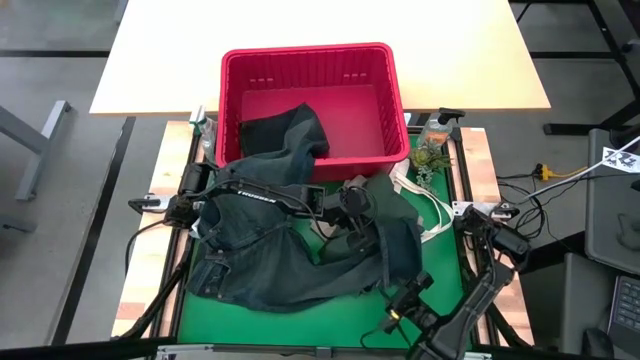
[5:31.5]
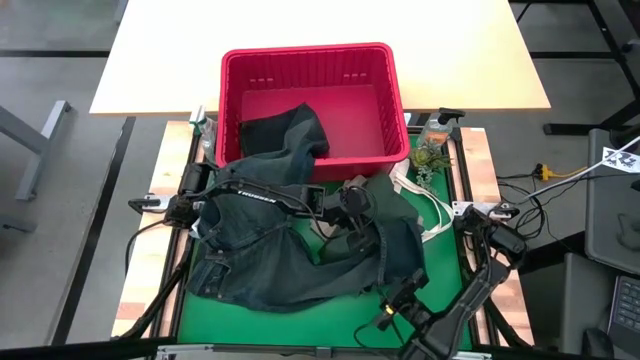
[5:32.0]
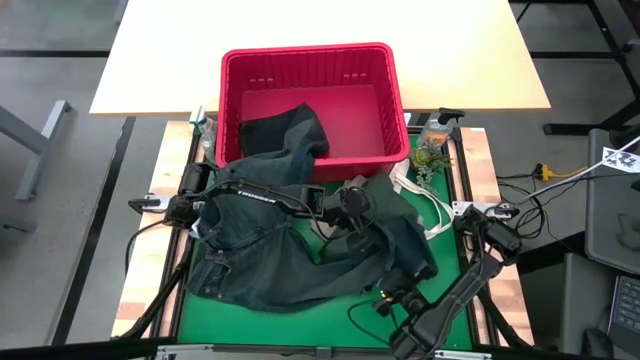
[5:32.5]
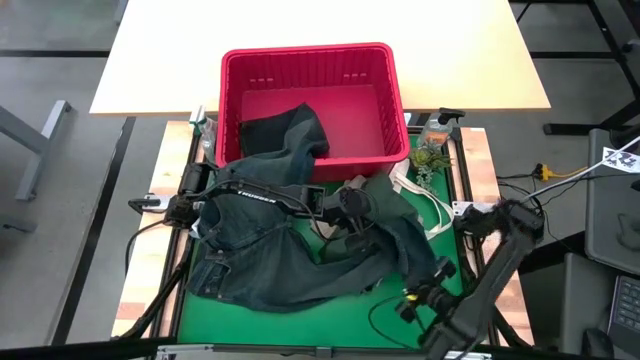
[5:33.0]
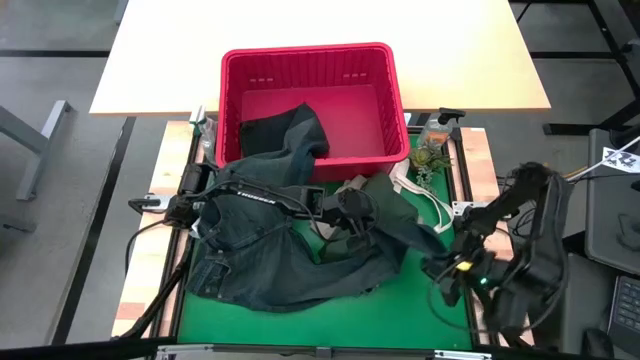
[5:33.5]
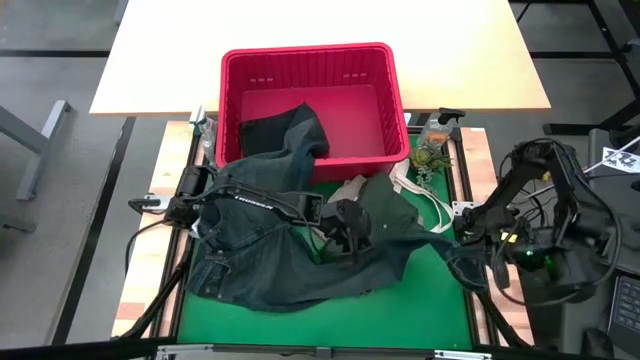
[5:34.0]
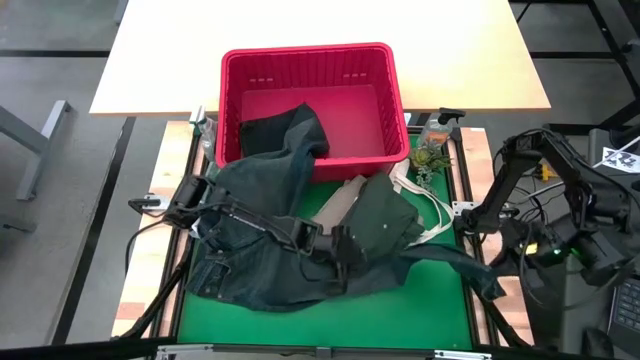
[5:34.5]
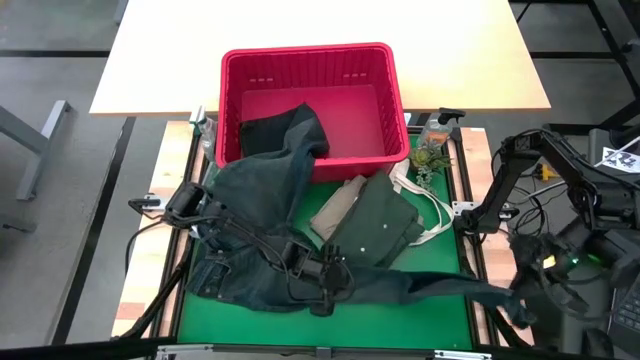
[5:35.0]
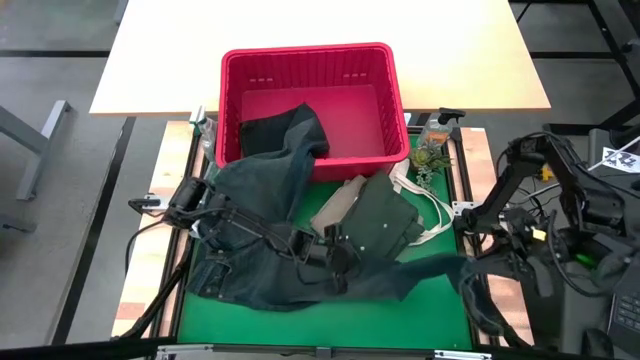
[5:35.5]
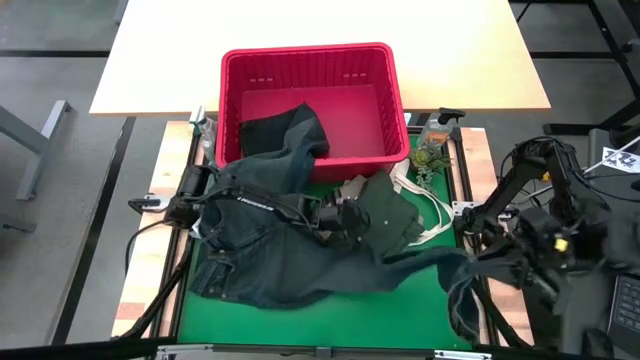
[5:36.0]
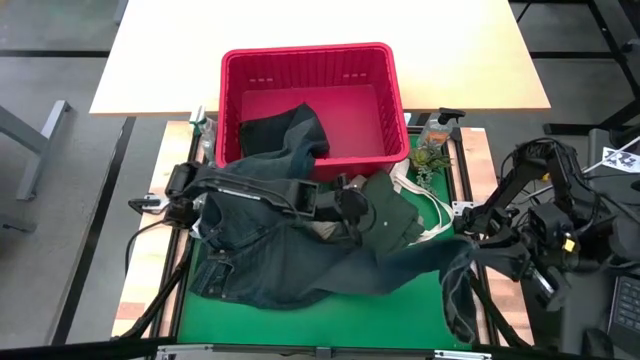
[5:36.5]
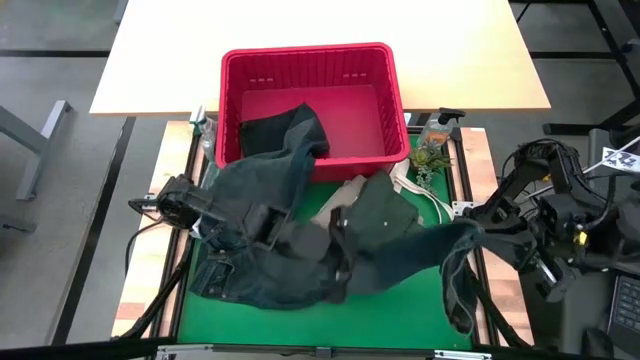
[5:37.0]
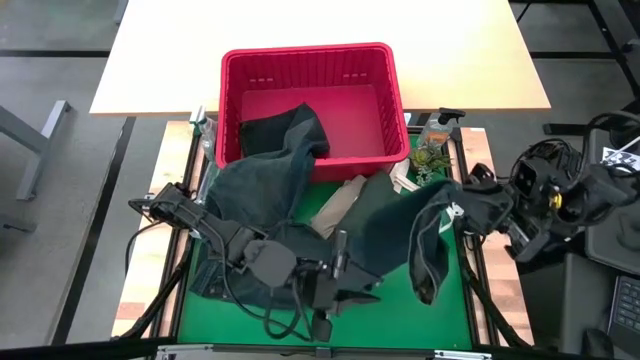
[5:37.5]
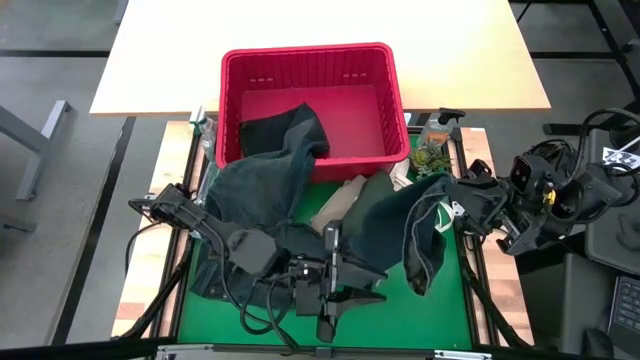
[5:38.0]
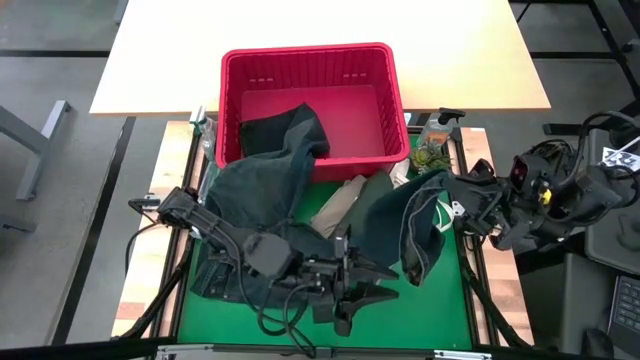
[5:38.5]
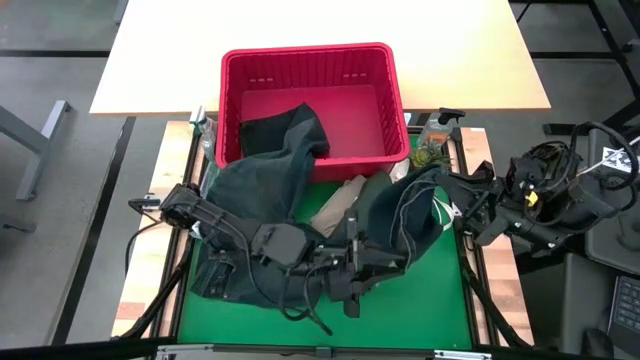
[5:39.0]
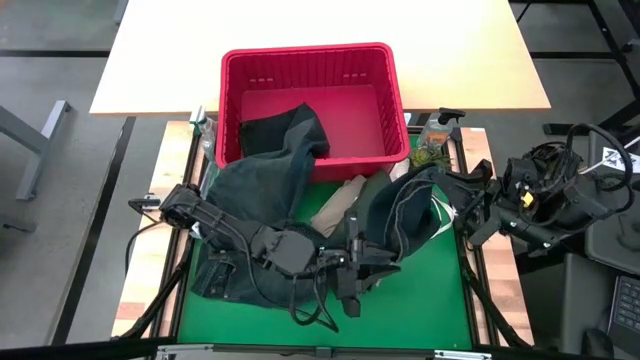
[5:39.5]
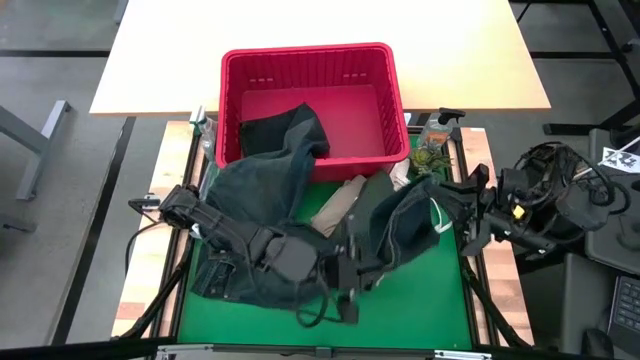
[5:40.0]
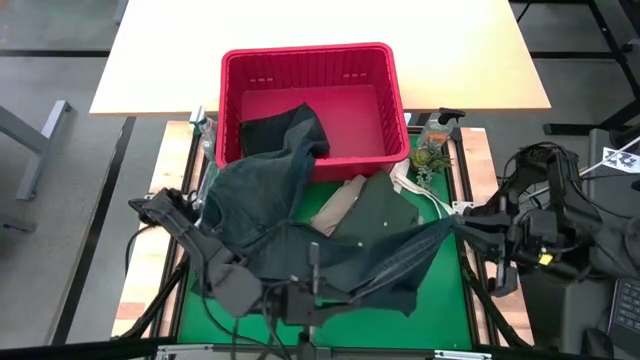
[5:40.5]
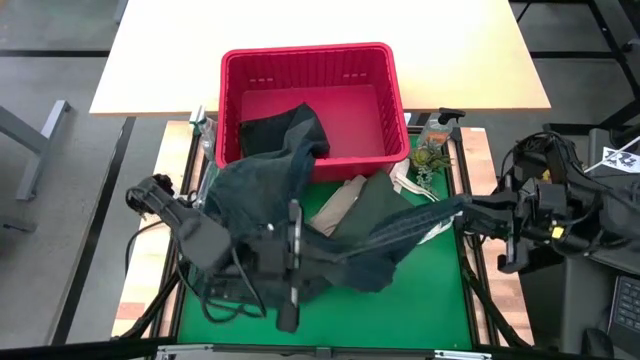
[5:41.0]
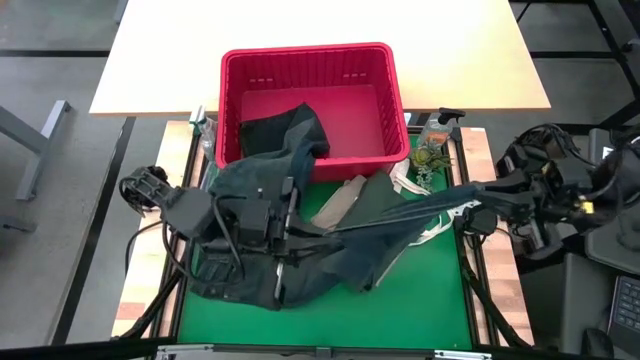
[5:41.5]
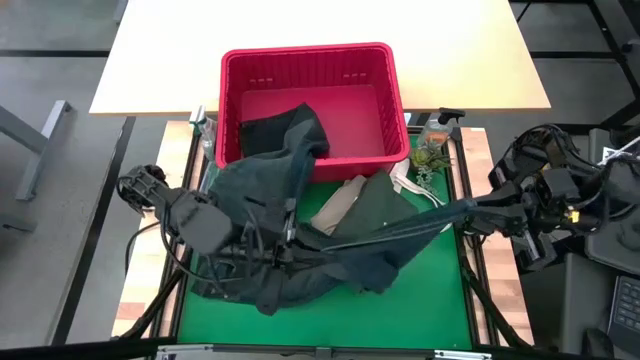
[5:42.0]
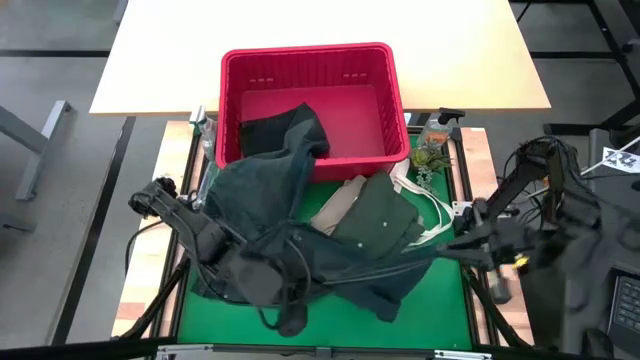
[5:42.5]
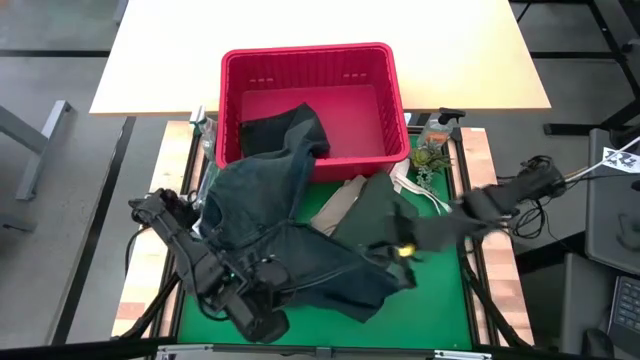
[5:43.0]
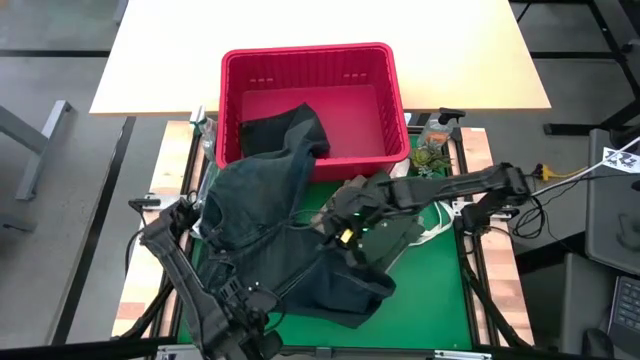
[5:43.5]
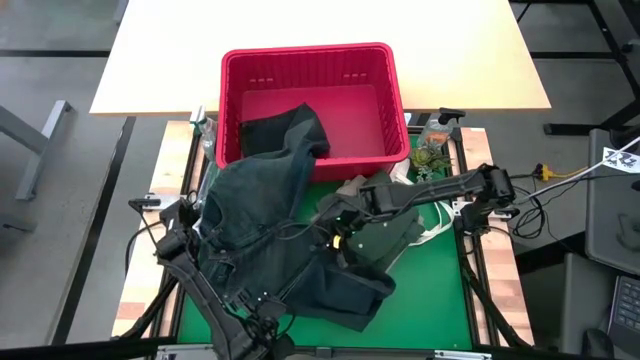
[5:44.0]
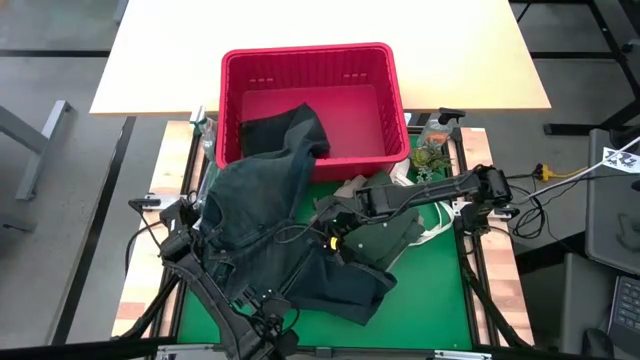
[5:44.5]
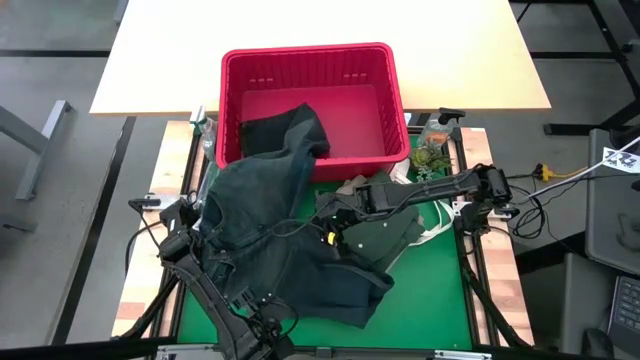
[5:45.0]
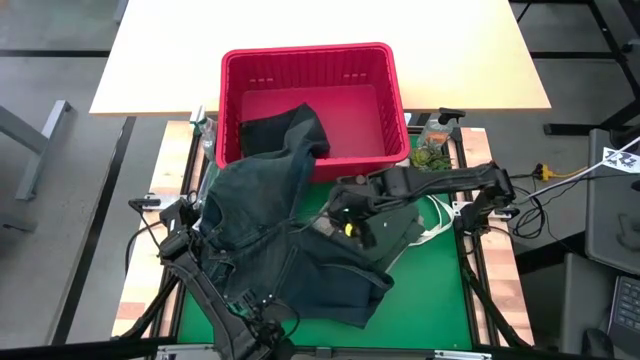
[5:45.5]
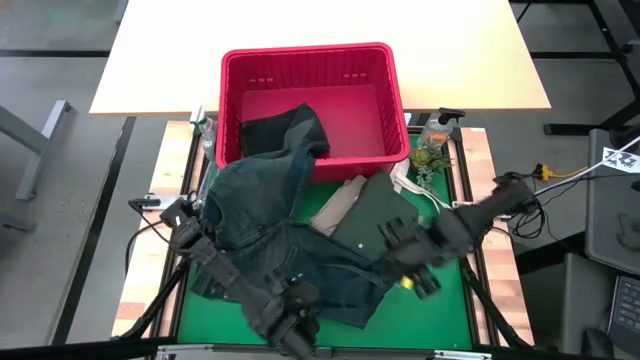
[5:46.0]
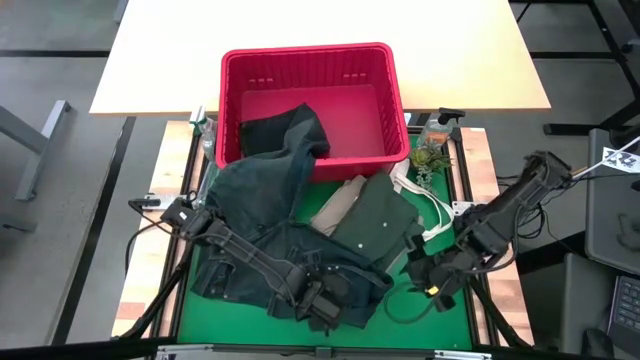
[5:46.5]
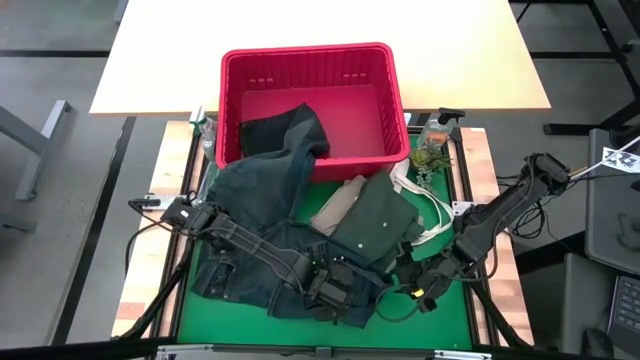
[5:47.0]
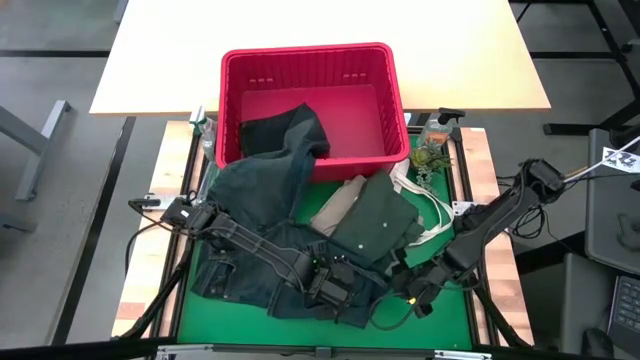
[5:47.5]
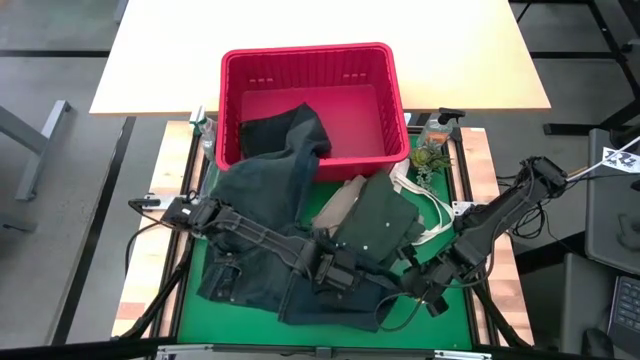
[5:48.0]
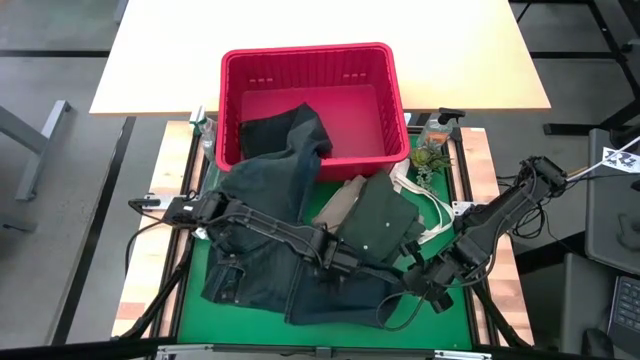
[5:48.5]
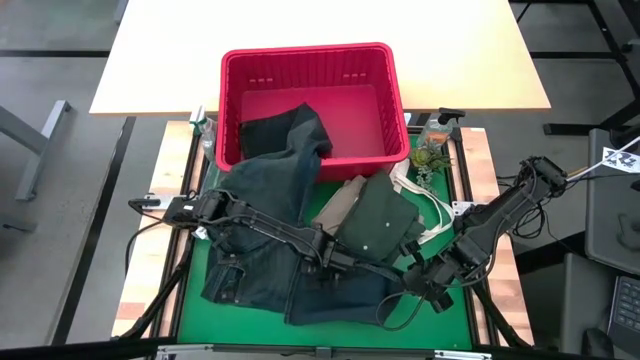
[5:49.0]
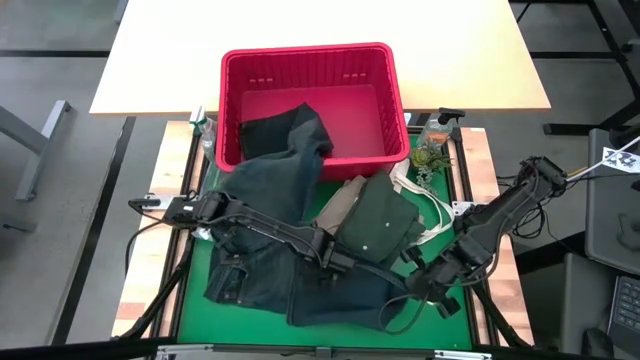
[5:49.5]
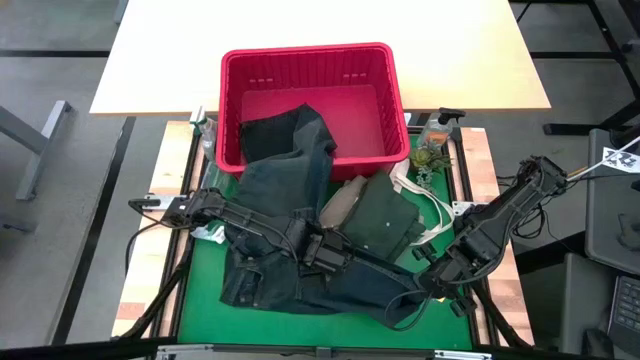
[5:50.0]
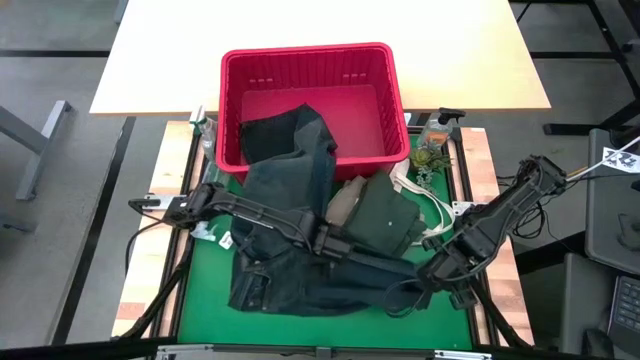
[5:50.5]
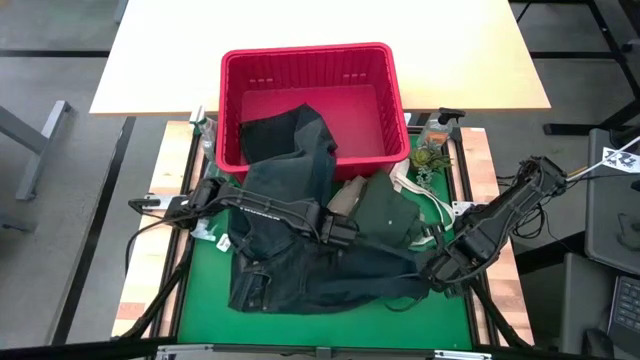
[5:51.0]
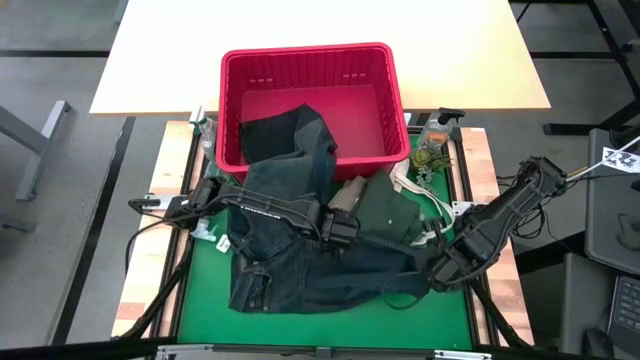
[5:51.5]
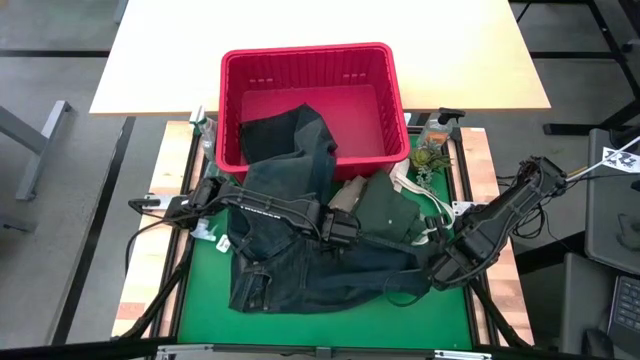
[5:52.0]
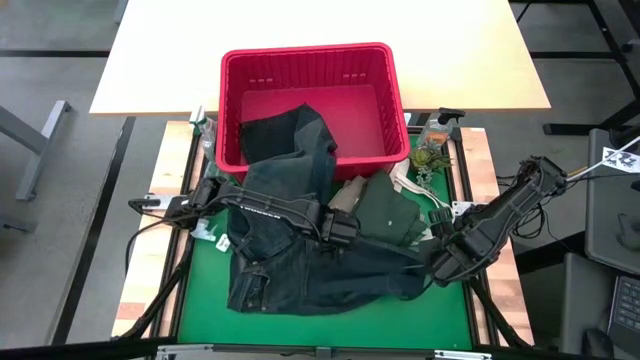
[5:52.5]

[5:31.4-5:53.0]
Task: Fold laundry
Fold the dark blue pants
